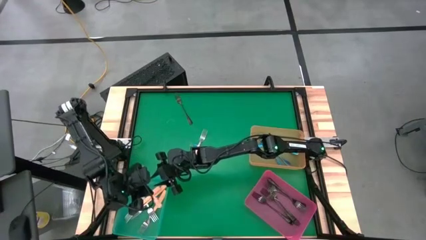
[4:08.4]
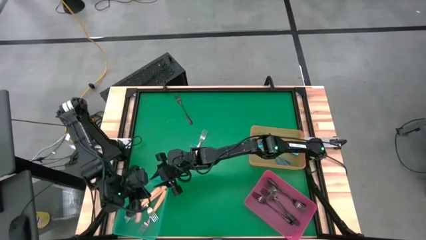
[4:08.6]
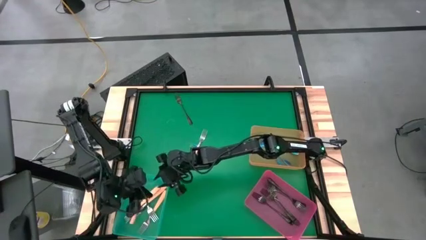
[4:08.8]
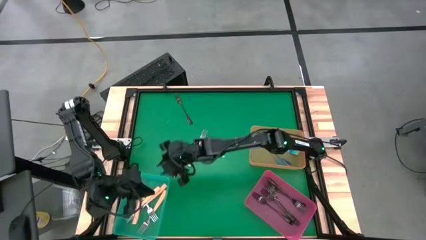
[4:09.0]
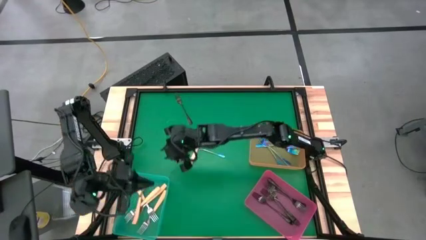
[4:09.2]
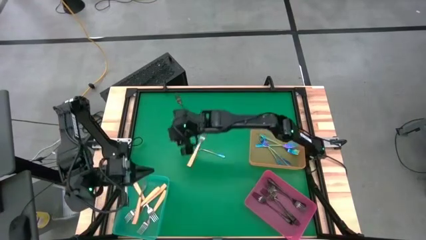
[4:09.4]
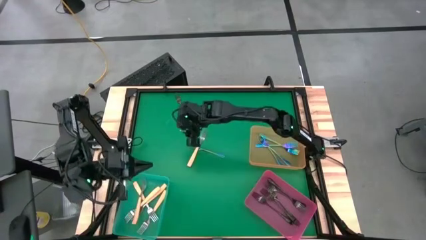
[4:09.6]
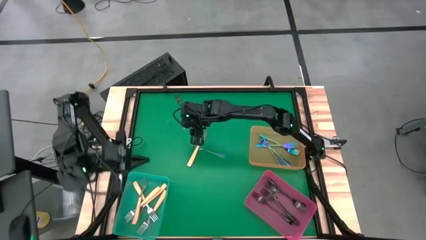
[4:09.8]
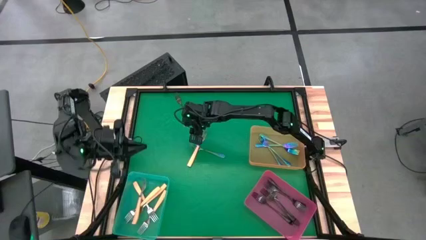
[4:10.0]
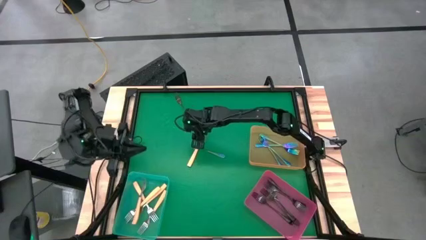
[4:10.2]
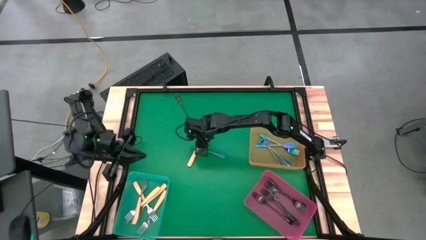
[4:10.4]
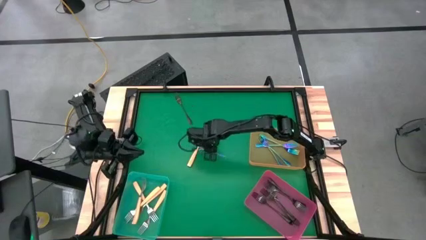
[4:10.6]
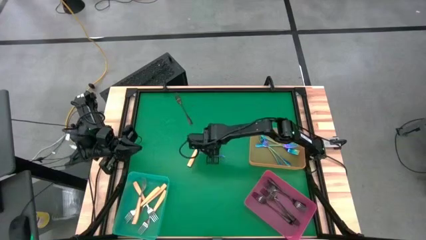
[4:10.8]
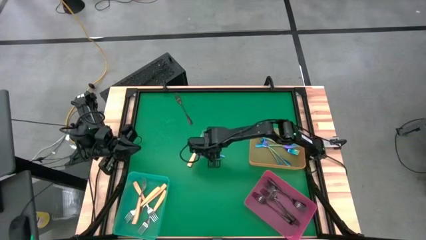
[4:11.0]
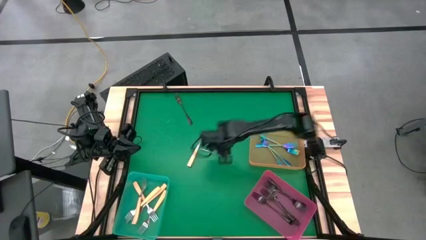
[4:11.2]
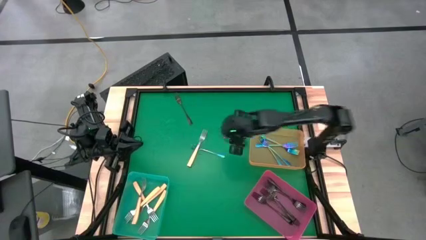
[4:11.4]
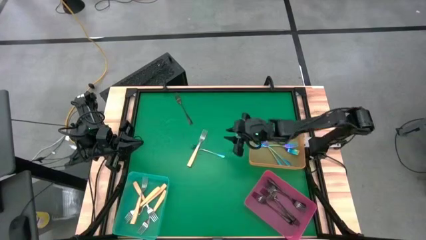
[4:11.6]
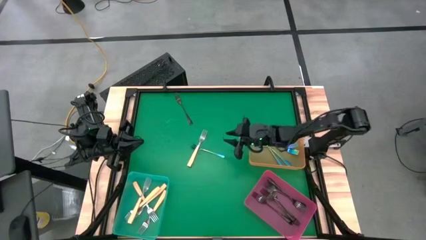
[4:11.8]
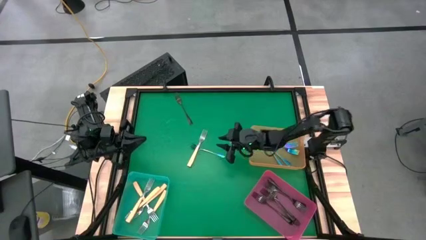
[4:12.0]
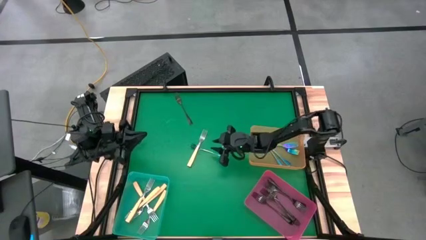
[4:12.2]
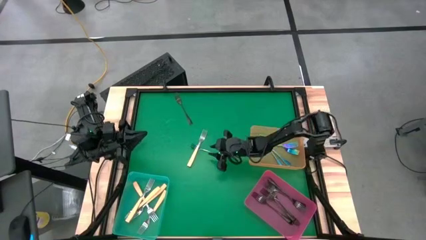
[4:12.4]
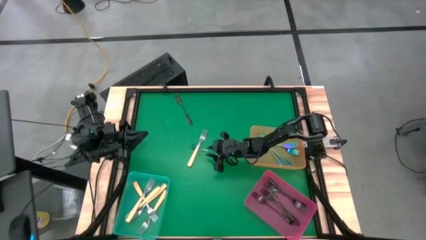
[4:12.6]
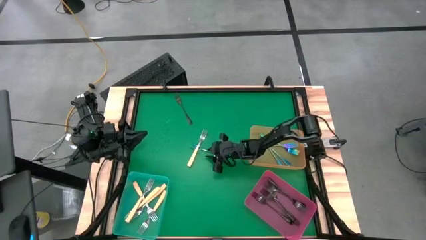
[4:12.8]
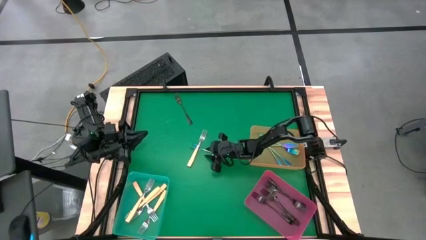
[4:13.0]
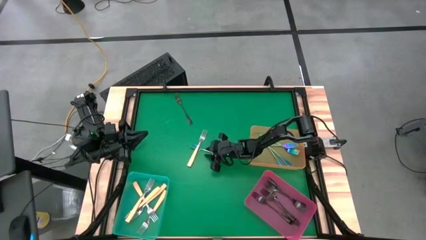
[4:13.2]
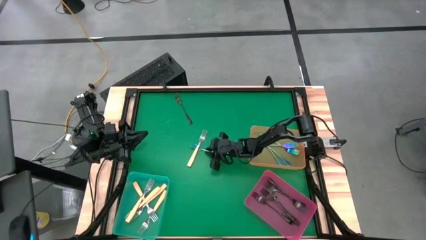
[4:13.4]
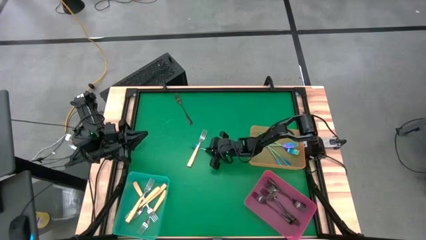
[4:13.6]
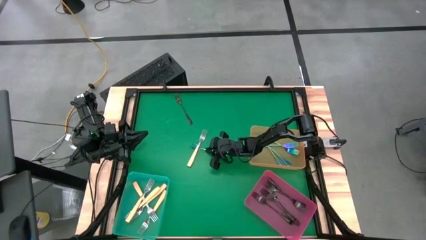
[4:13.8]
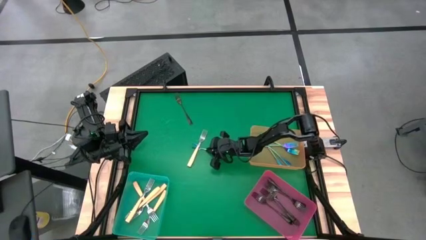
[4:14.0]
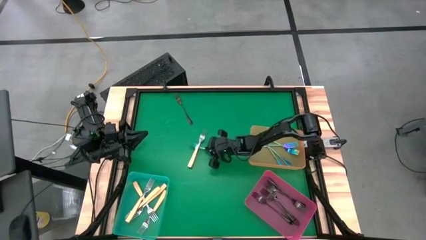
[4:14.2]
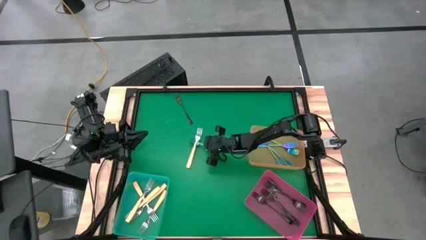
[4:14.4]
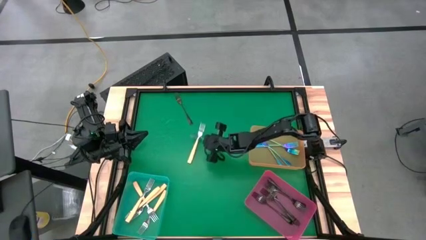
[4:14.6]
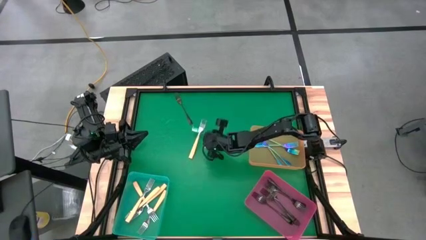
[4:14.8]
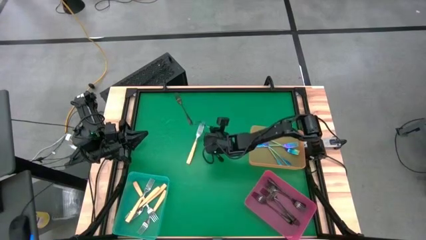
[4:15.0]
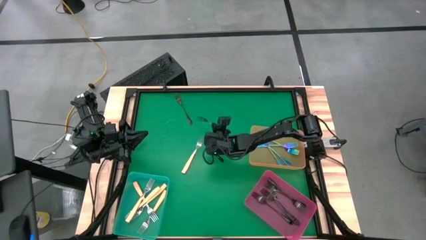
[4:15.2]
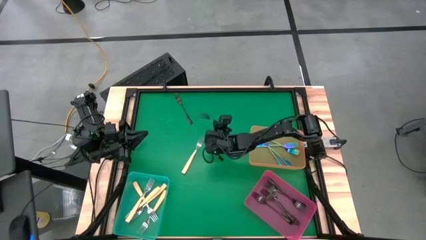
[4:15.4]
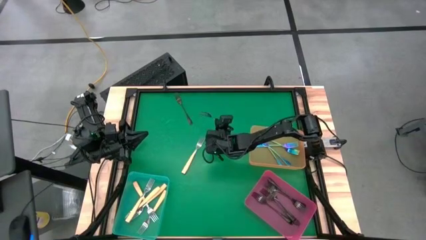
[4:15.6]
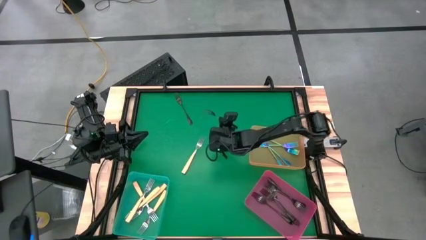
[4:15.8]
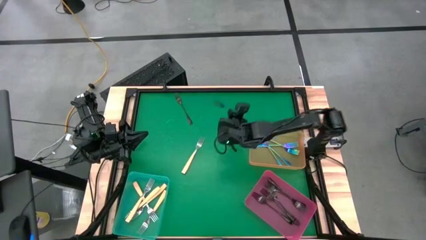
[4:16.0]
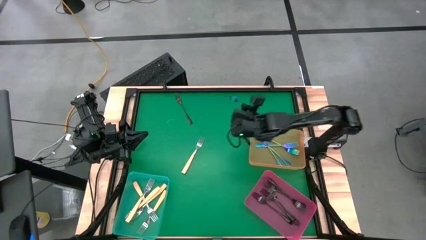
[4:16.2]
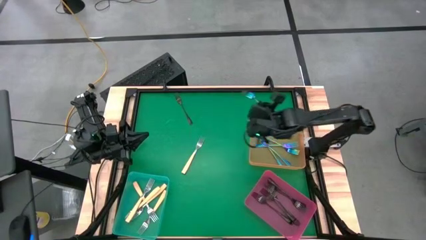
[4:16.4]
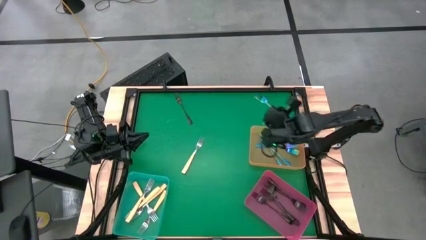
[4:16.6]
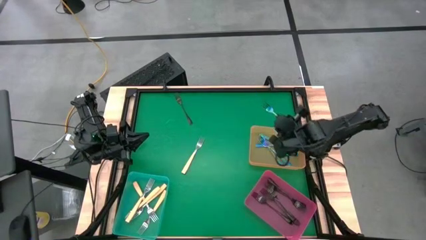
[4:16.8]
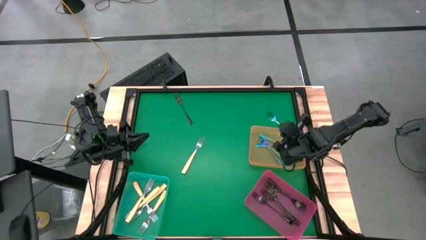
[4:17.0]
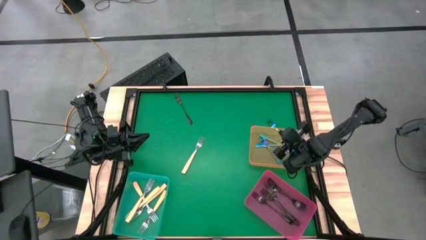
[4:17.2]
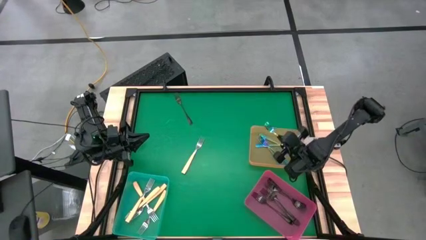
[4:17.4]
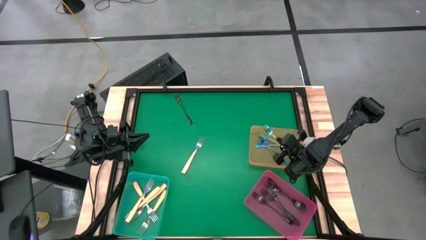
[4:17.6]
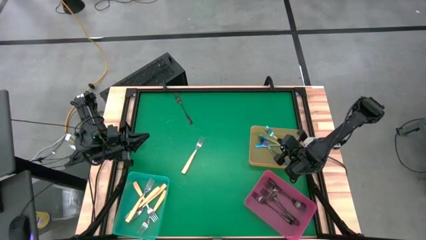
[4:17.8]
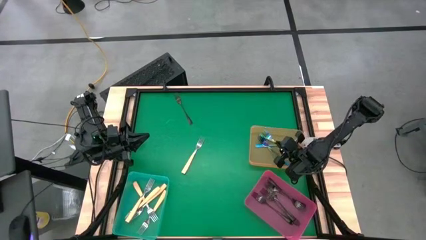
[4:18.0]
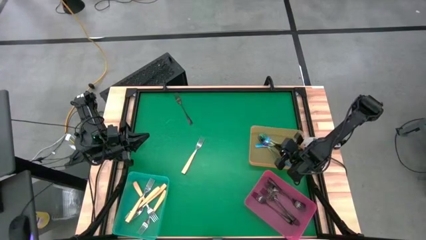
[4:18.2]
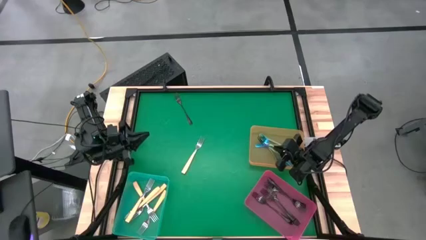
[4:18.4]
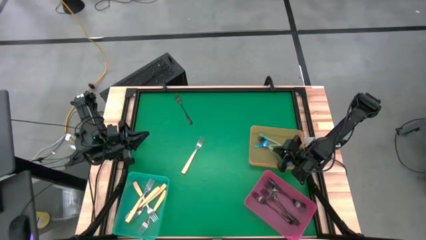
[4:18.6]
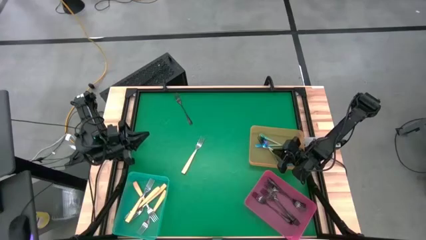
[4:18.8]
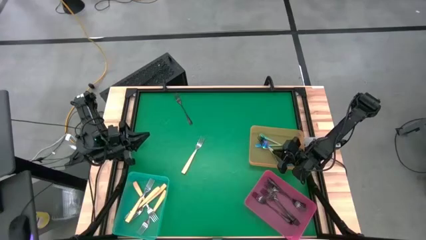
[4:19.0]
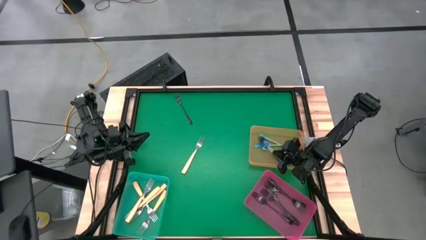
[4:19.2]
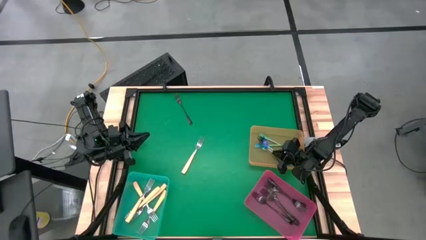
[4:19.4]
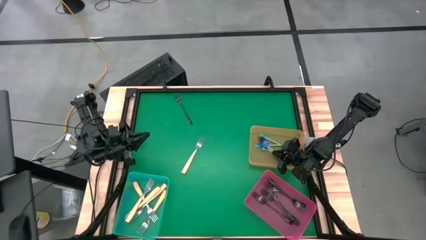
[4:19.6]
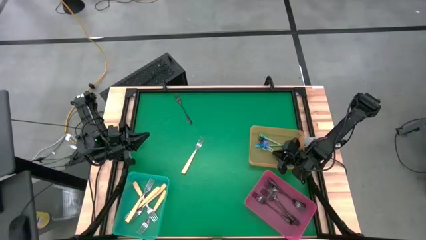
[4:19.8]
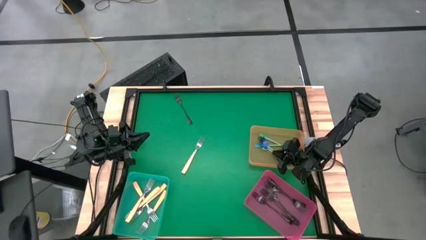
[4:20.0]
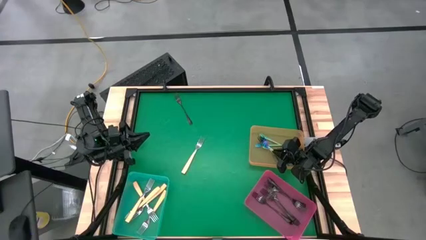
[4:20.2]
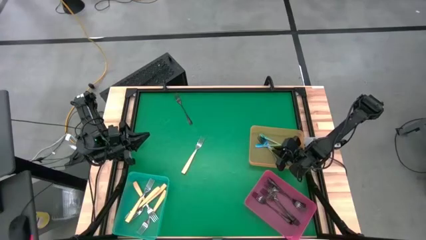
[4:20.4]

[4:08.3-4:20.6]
Task: Sort silverware by color (type)
Put the blue fork into the orange bin

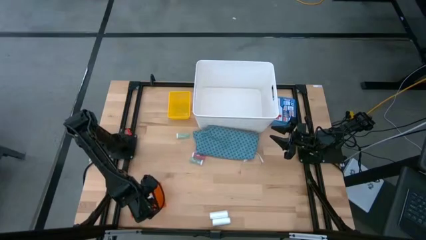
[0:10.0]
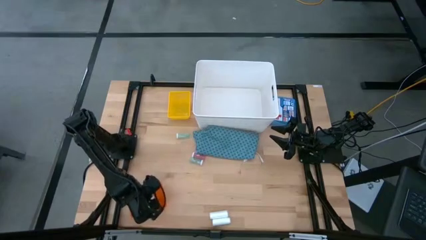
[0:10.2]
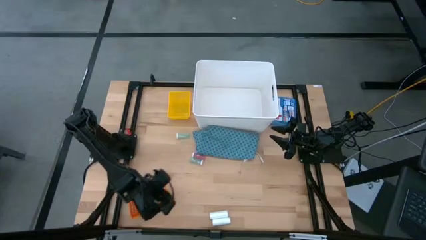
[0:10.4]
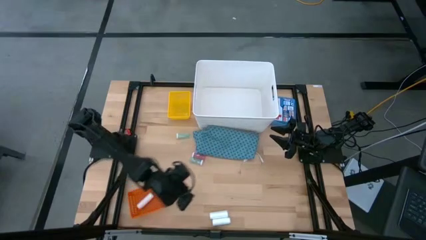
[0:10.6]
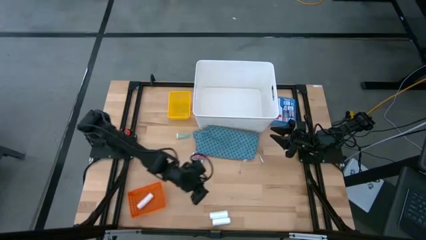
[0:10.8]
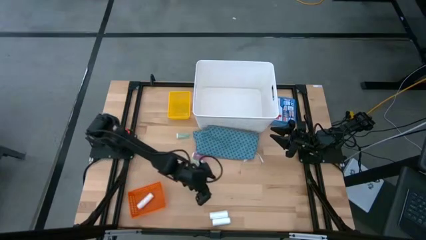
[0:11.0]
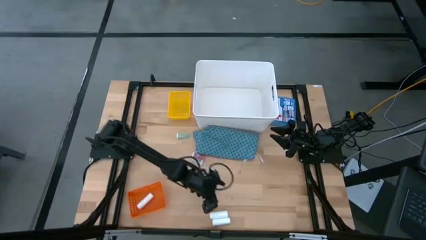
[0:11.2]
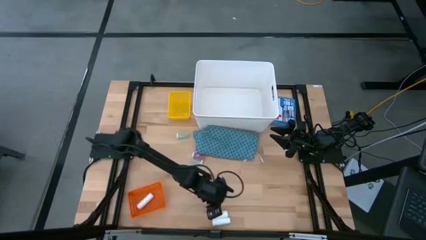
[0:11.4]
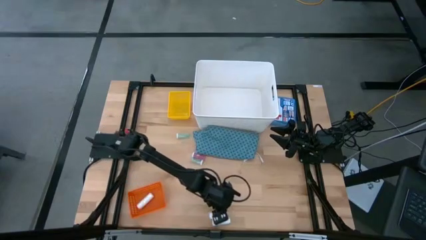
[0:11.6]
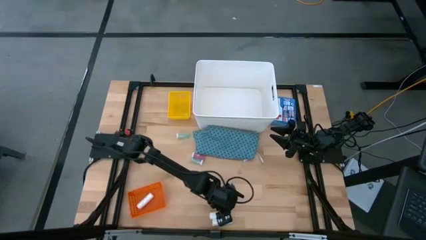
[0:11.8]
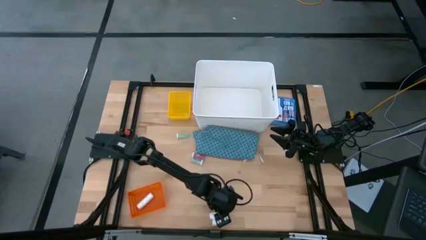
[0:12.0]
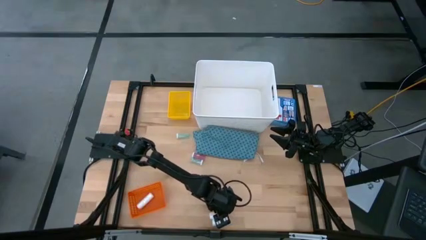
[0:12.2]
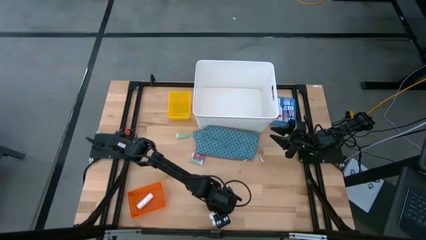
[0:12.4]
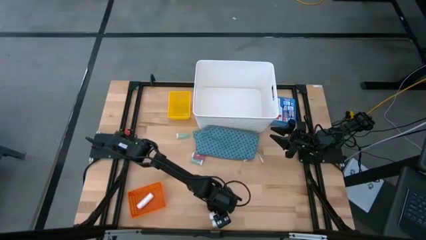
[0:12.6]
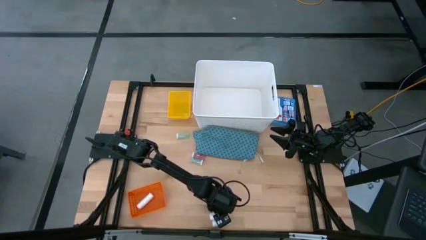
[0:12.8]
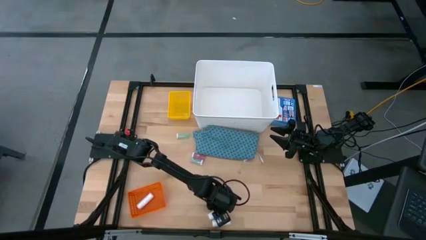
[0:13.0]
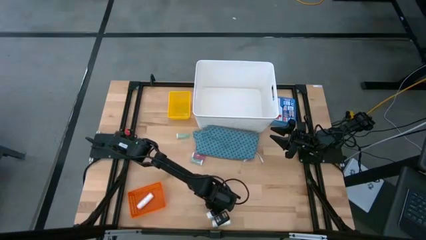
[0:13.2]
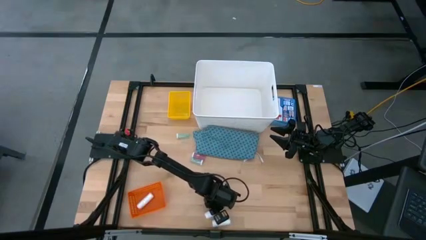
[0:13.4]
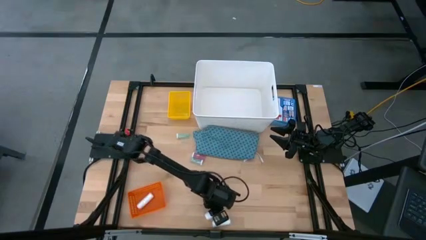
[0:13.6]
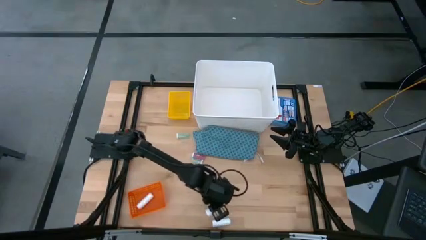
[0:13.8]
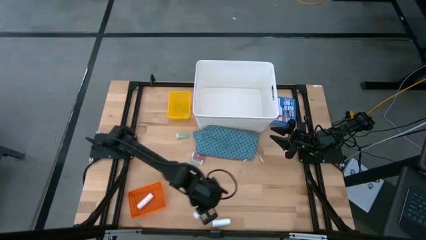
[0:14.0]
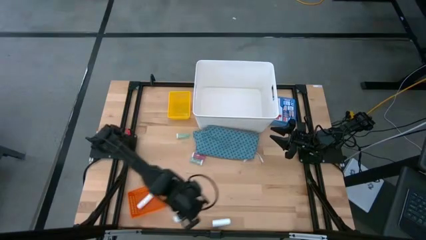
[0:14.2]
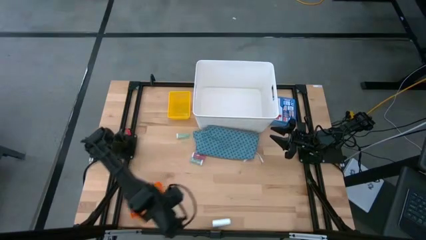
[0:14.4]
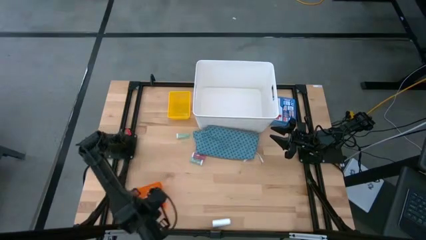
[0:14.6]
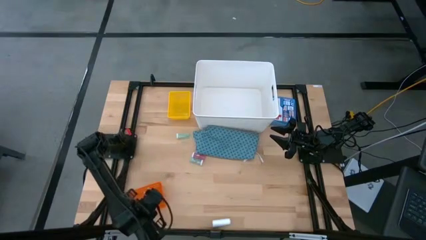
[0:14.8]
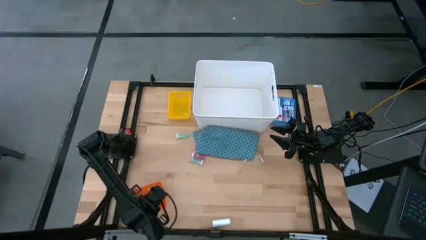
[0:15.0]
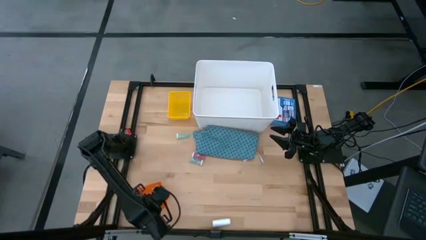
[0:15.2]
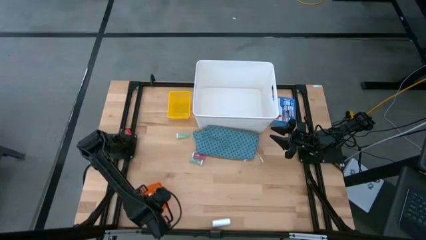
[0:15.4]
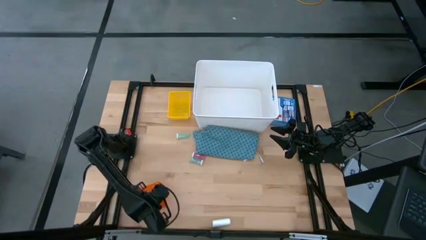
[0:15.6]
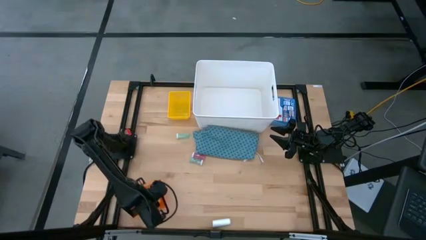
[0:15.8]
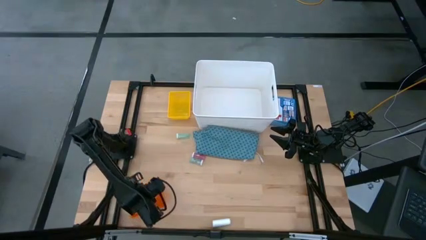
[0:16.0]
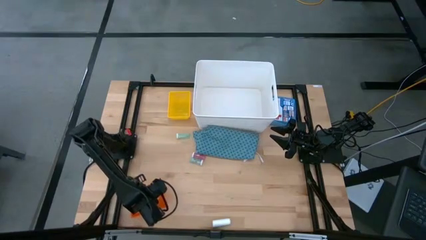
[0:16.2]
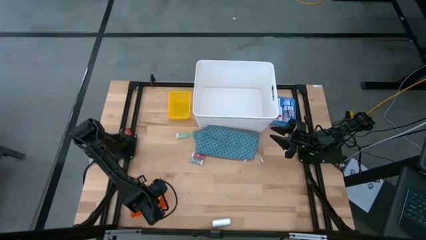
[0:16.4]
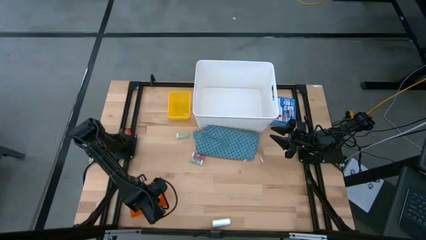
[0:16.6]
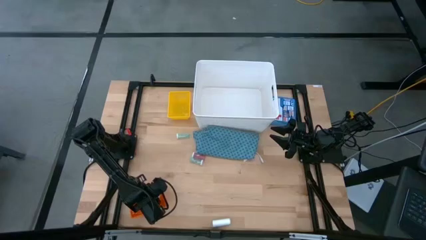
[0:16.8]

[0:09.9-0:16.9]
Task: Pick & place medical supplies in basket/bin
Put the top white gauze into the orange bin
